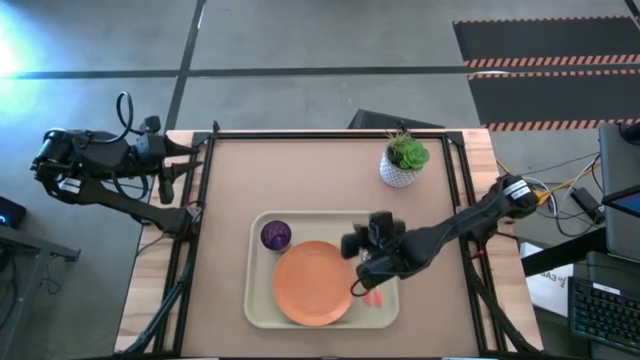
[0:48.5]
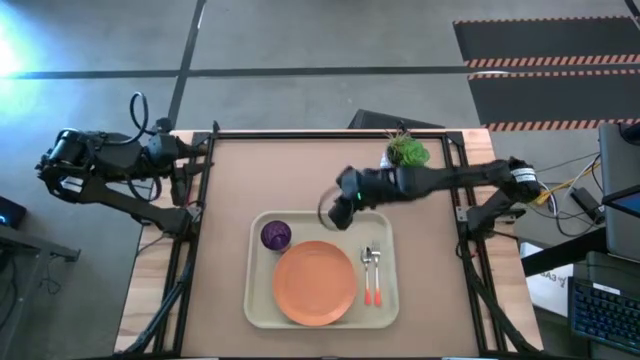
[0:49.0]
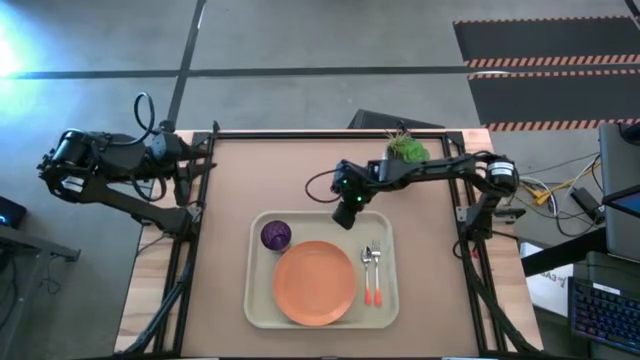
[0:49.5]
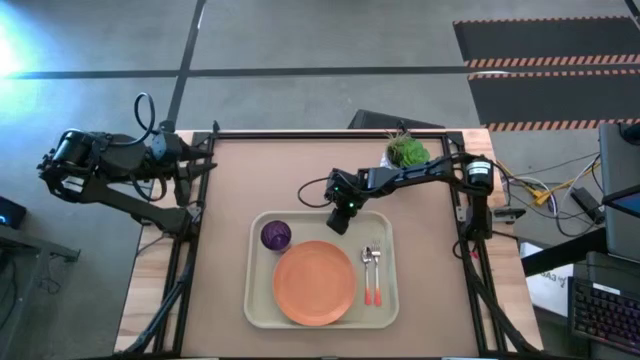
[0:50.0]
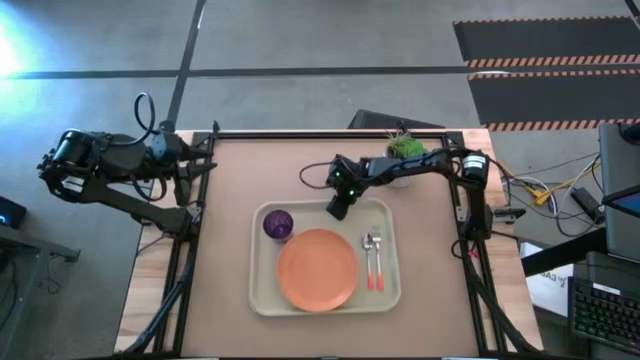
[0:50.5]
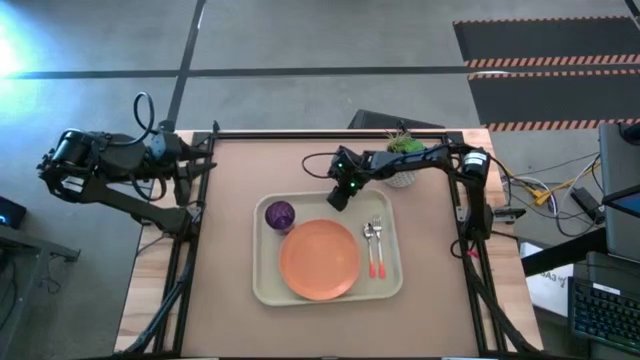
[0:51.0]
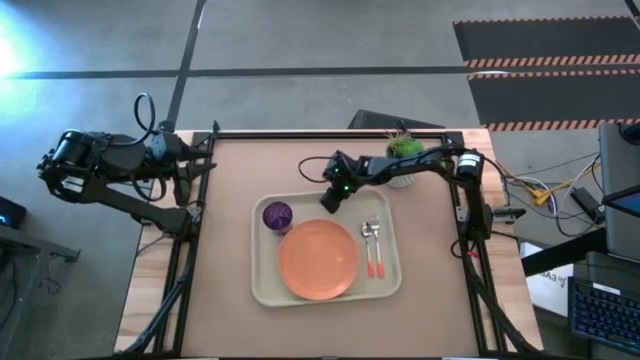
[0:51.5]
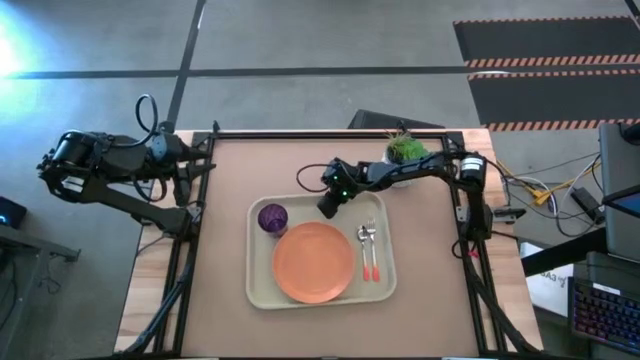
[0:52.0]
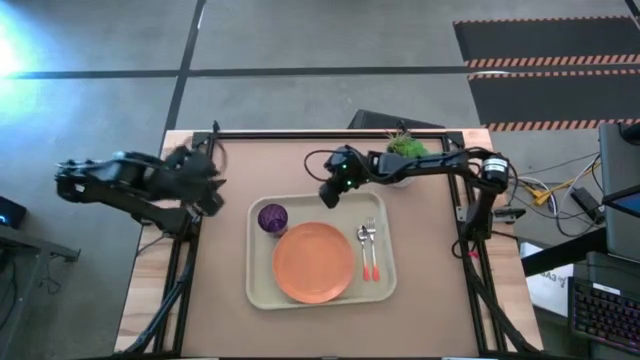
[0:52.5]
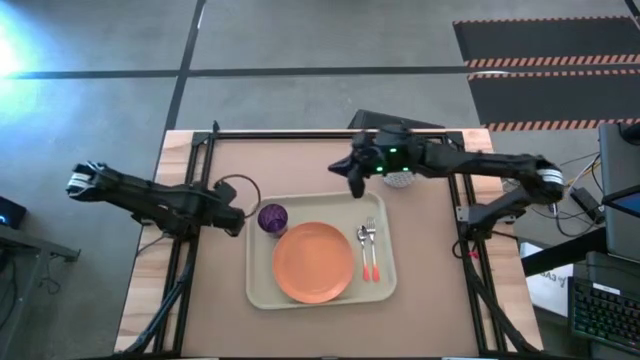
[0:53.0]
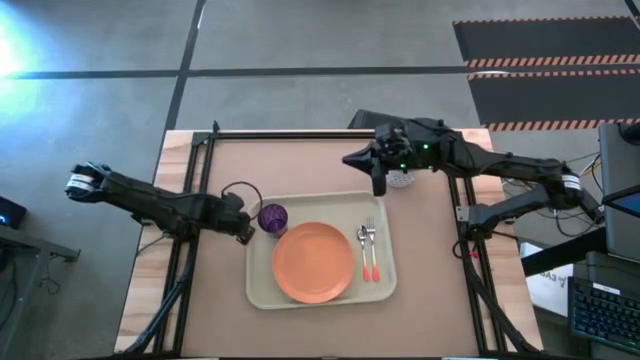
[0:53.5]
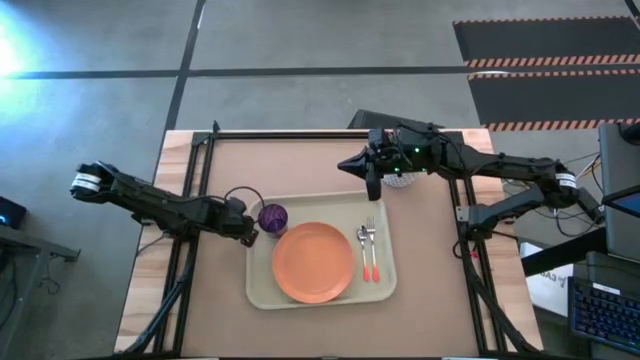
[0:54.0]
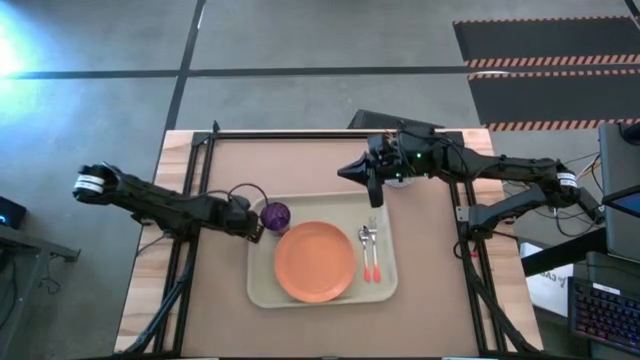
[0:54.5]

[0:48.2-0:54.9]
Task: Pick and place plate/cup/fork/spoon on tray
Adjust the white tray

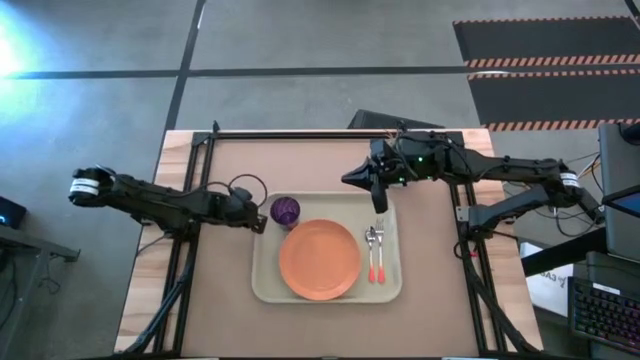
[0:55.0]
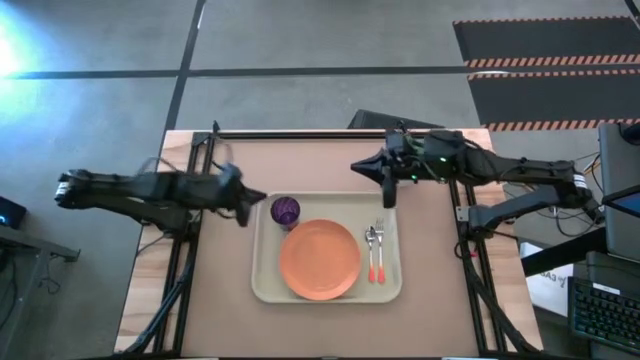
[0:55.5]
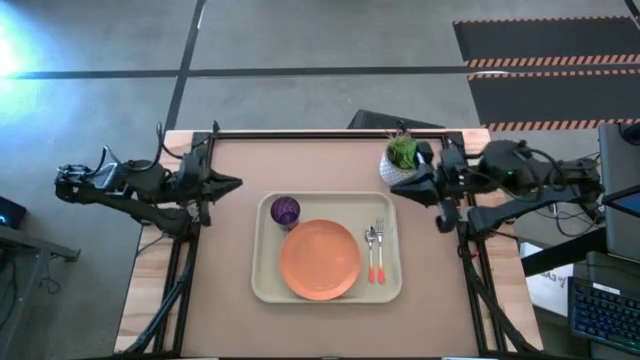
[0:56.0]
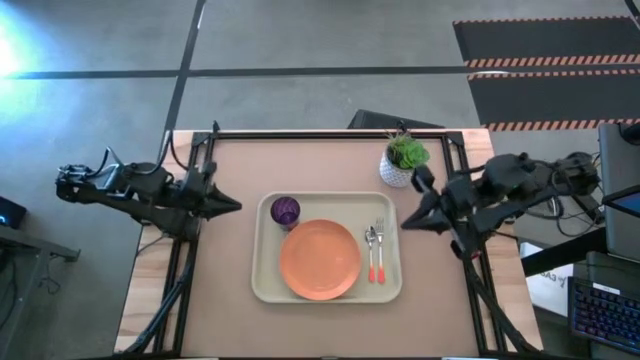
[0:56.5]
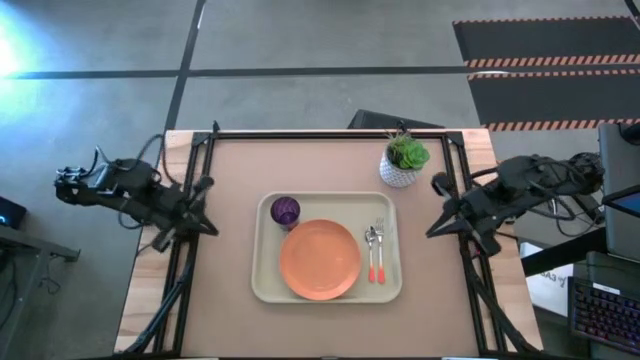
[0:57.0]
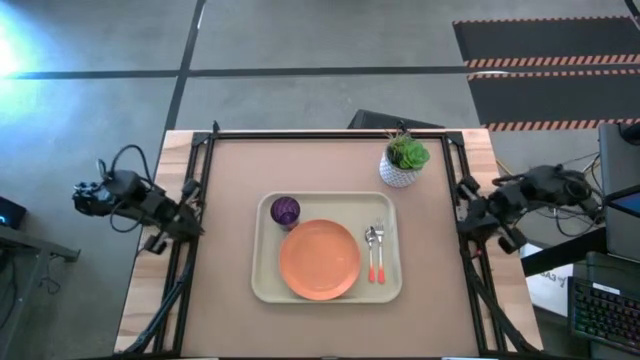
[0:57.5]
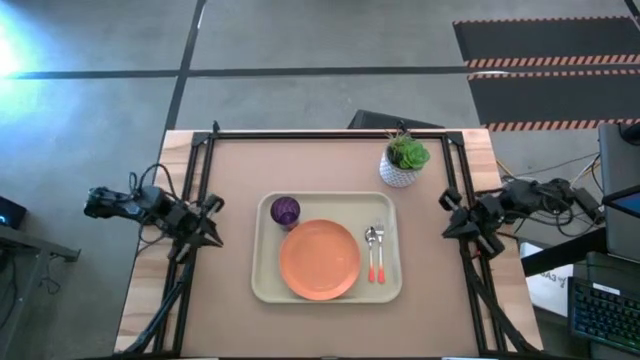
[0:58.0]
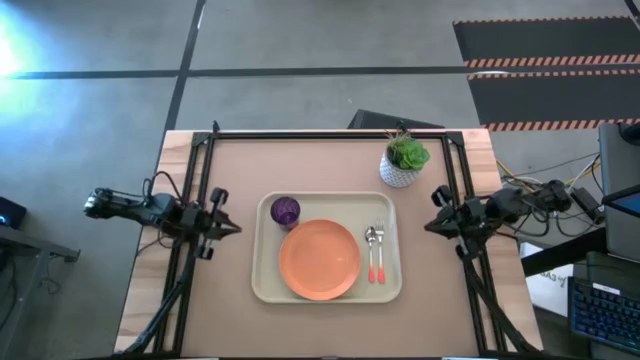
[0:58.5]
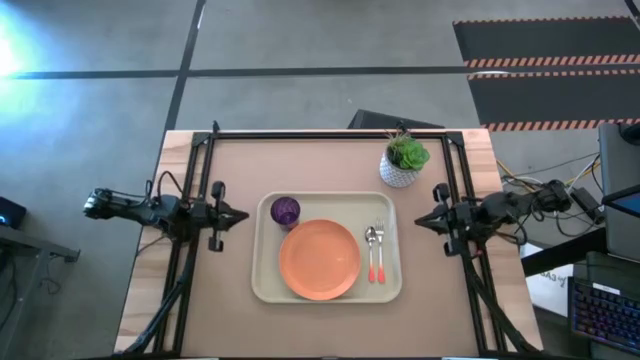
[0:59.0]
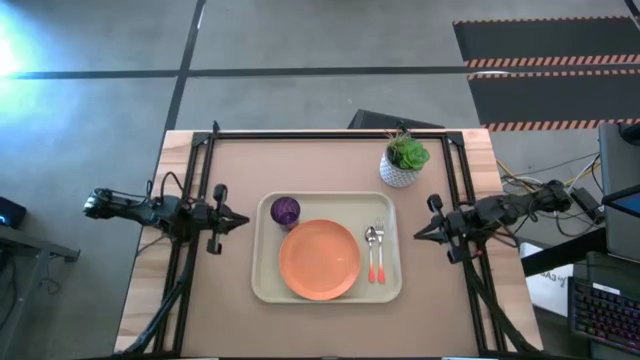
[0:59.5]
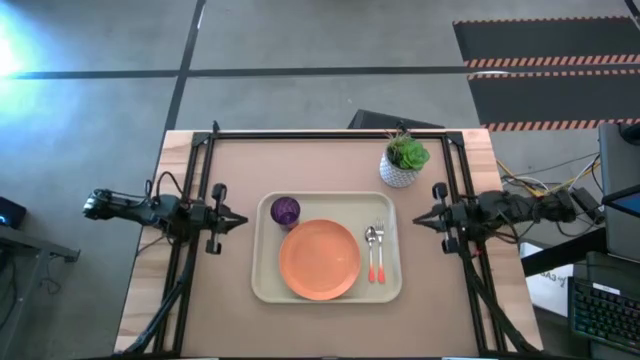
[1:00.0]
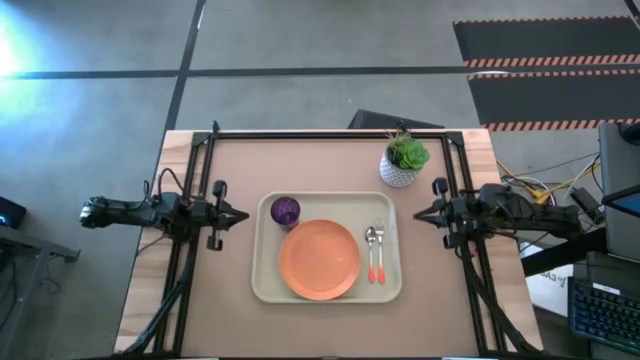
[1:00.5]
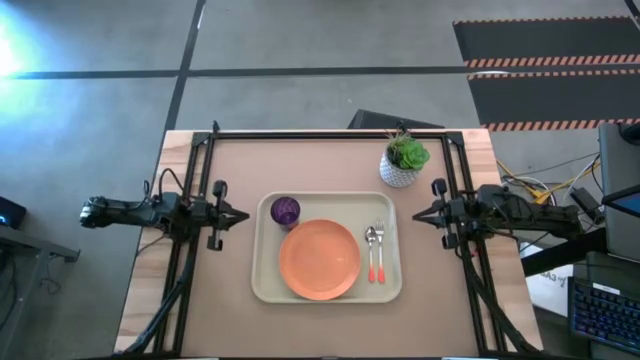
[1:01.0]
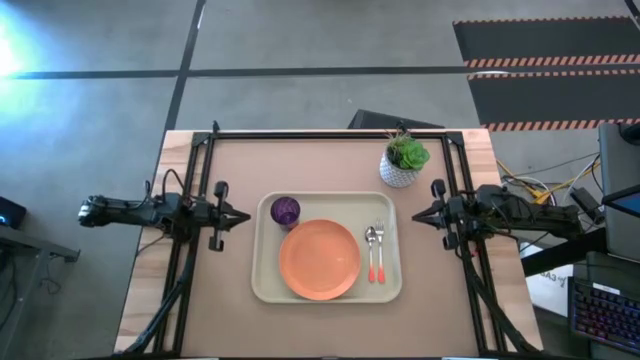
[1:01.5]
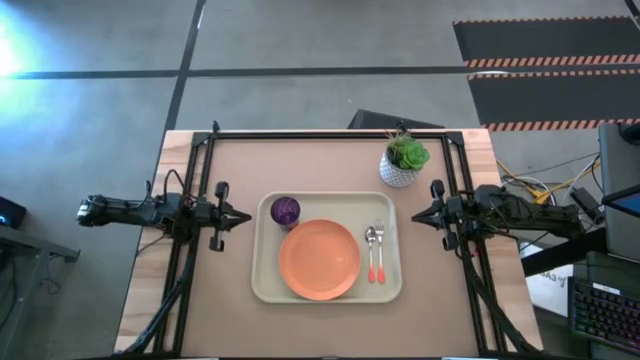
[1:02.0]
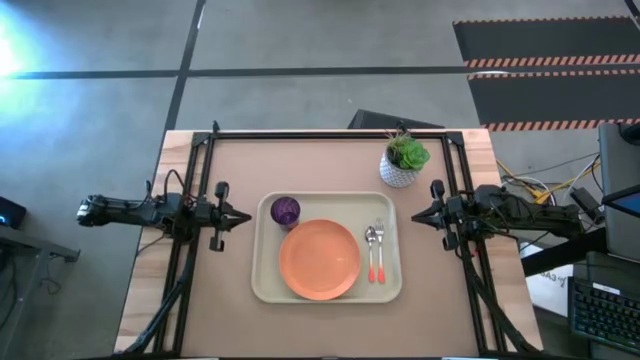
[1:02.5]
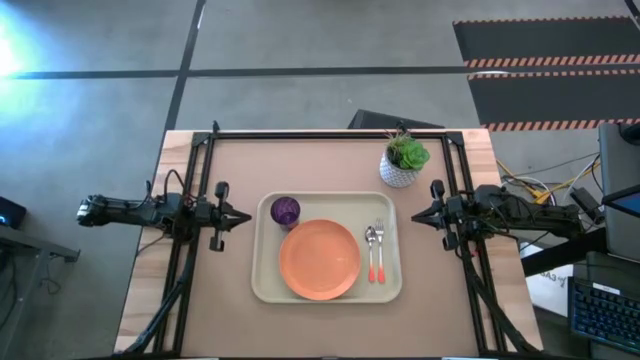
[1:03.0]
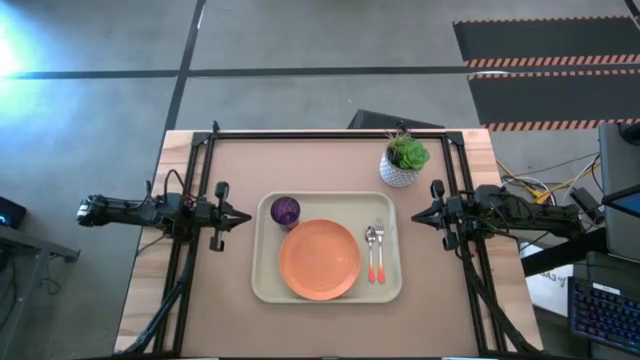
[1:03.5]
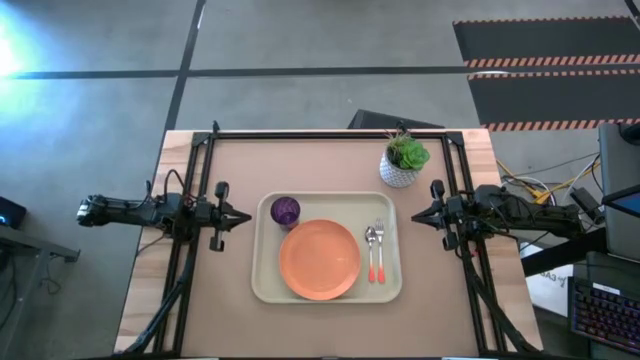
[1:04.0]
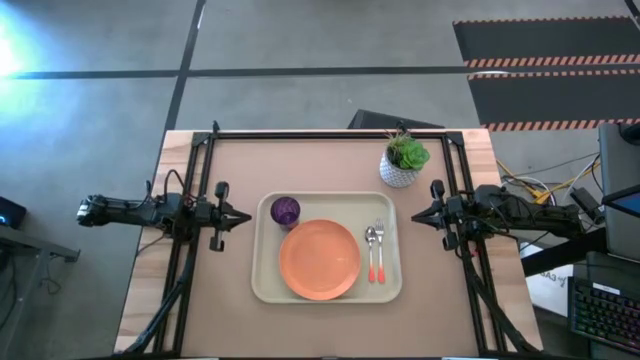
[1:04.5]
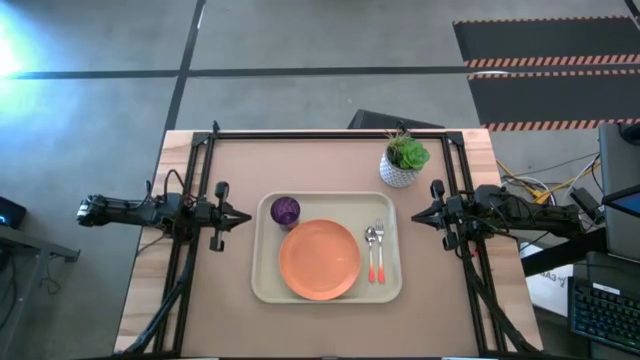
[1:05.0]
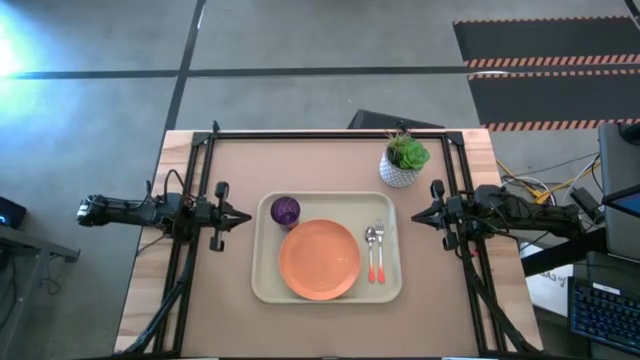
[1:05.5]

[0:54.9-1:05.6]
Return to Home Position

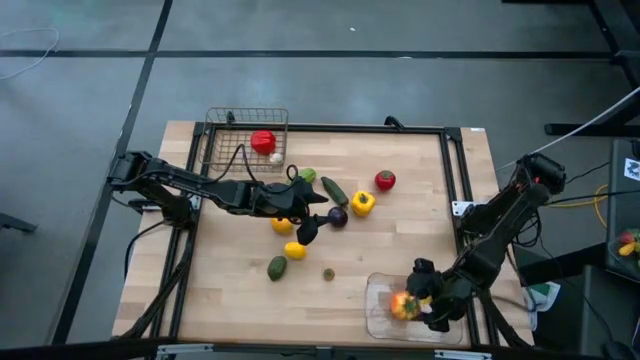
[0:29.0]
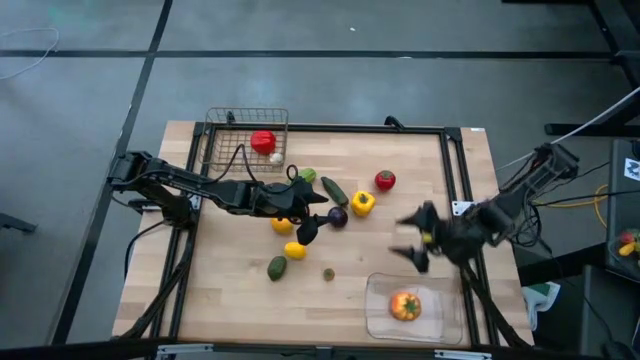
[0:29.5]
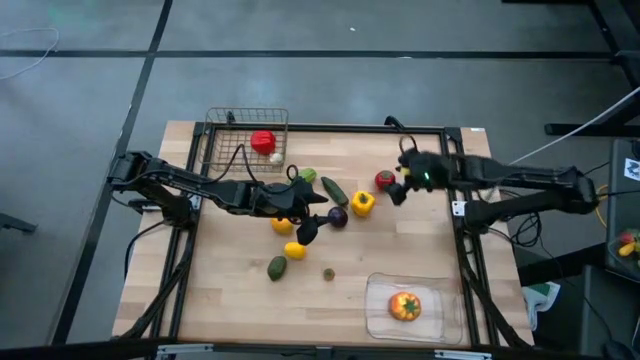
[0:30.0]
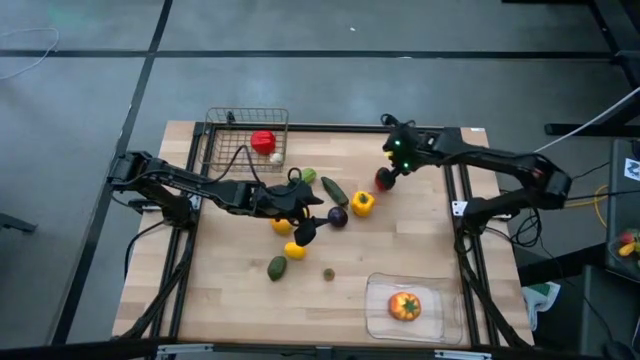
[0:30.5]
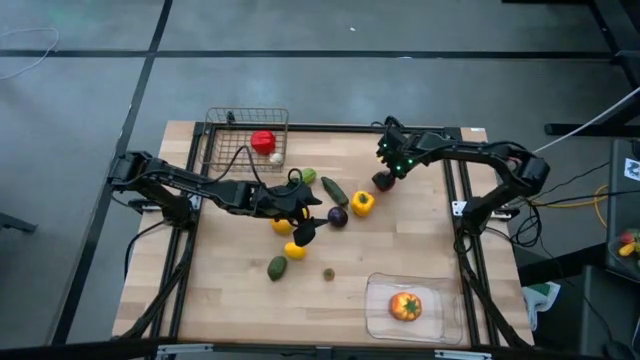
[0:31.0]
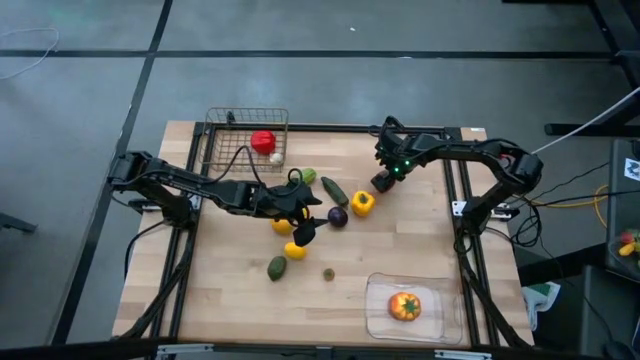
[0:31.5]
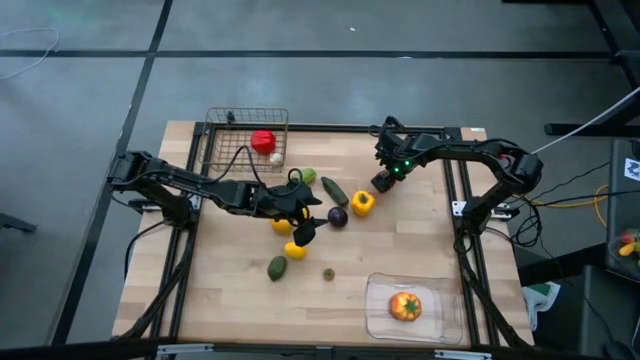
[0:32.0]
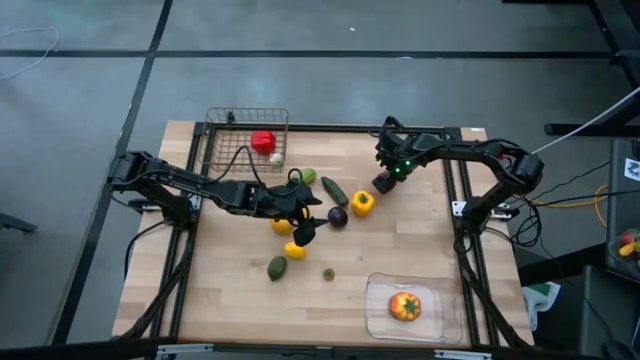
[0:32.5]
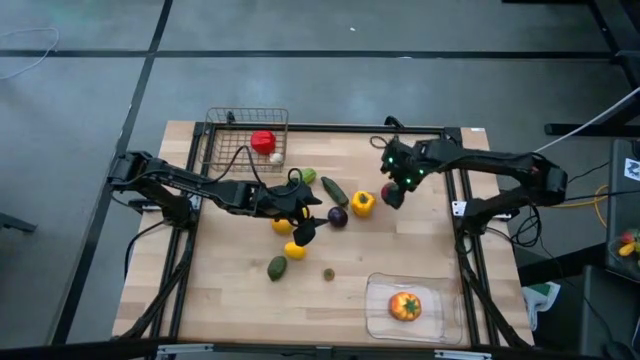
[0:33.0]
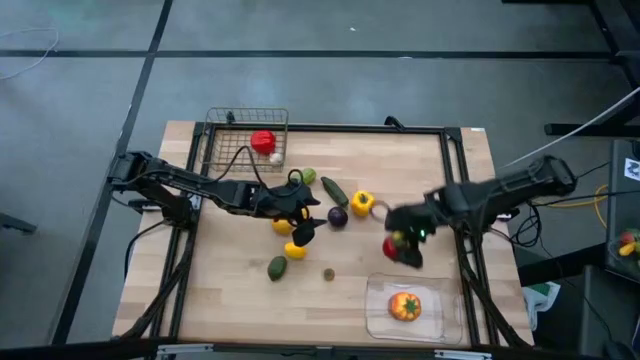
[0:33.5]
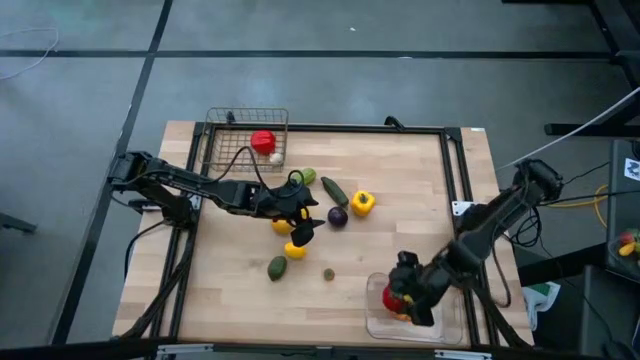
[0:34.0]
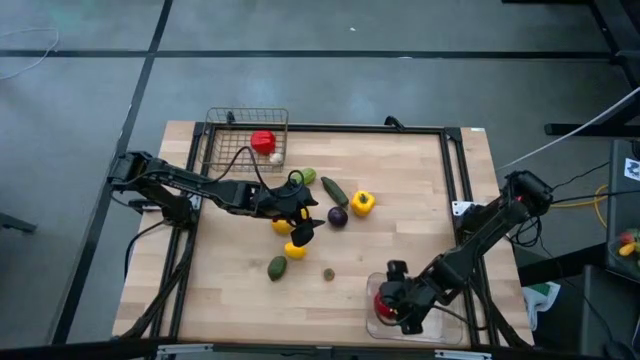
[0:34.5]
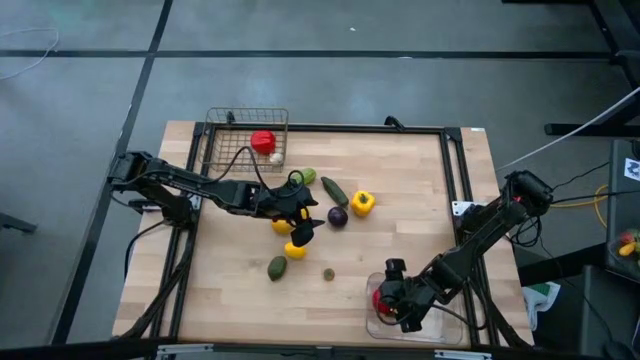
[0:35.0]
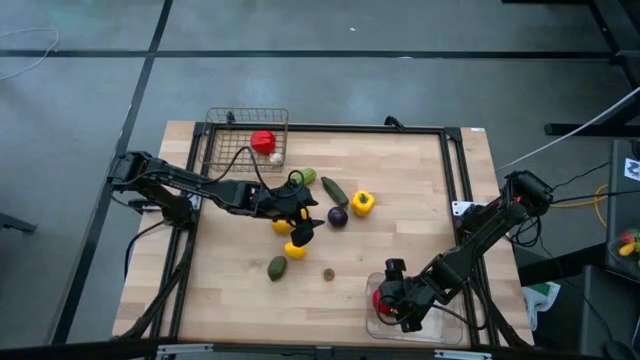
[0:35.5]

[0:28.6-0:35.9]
Task: Sort produce into baskets
Put the red tomato into the transparent bin
